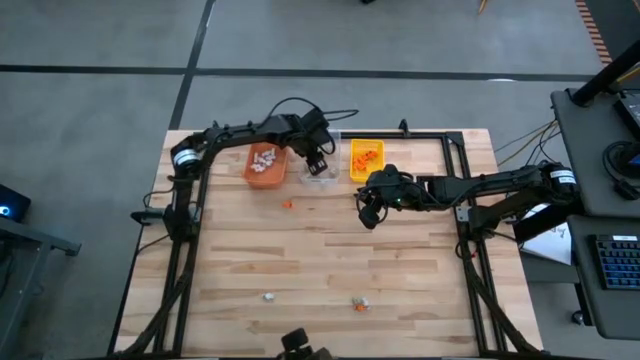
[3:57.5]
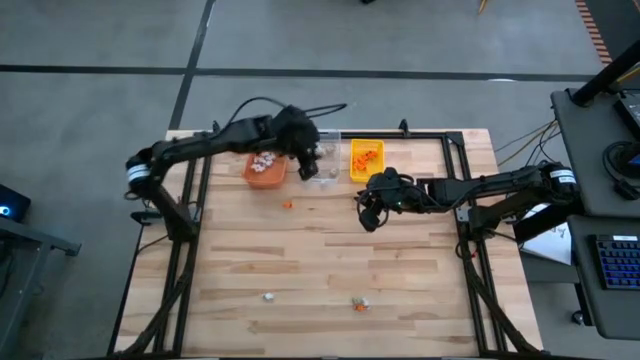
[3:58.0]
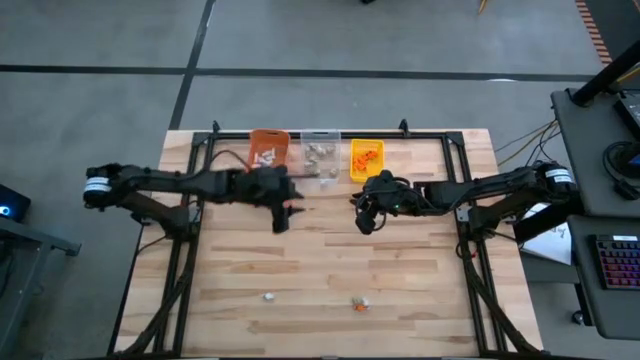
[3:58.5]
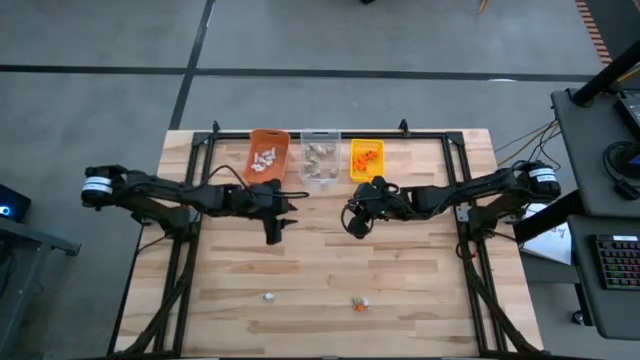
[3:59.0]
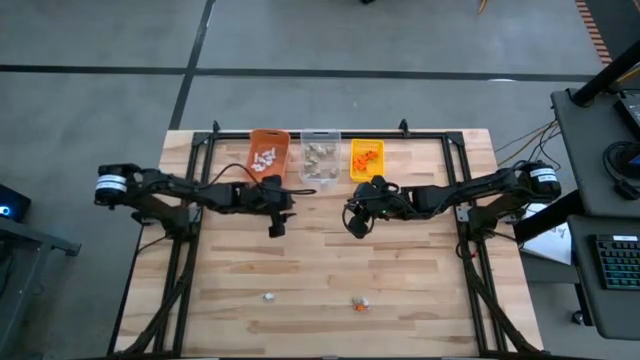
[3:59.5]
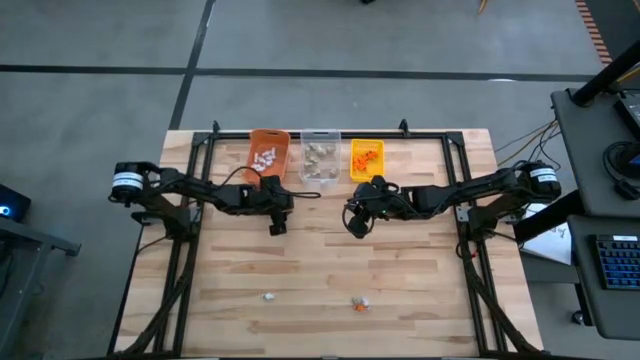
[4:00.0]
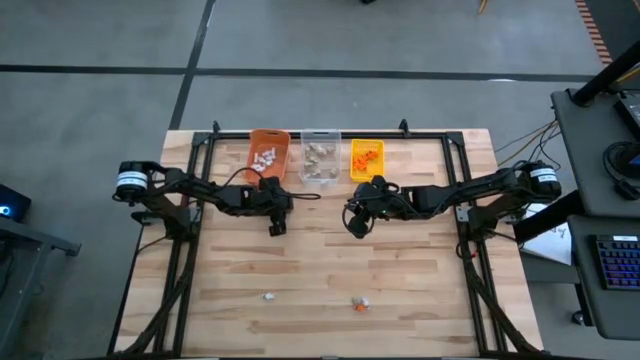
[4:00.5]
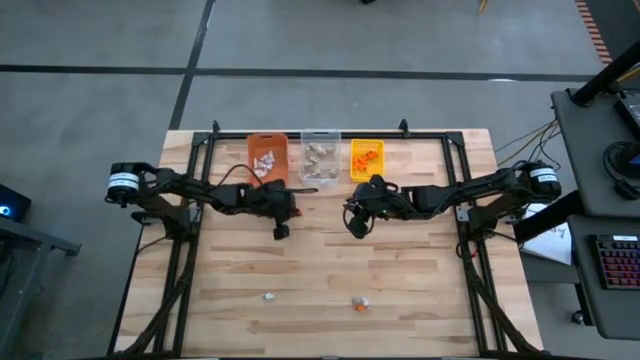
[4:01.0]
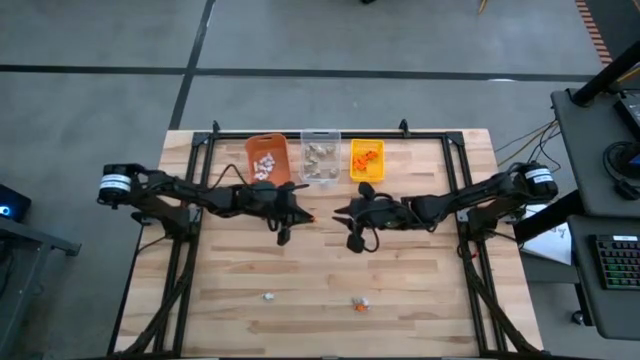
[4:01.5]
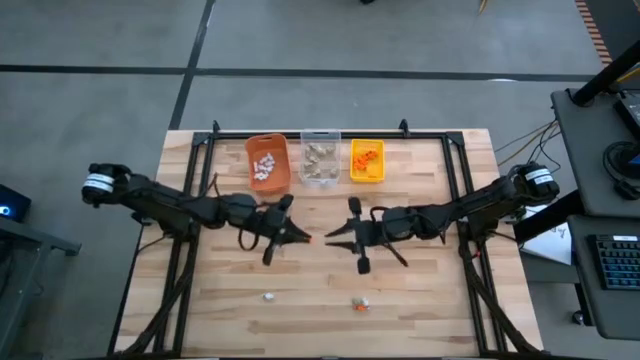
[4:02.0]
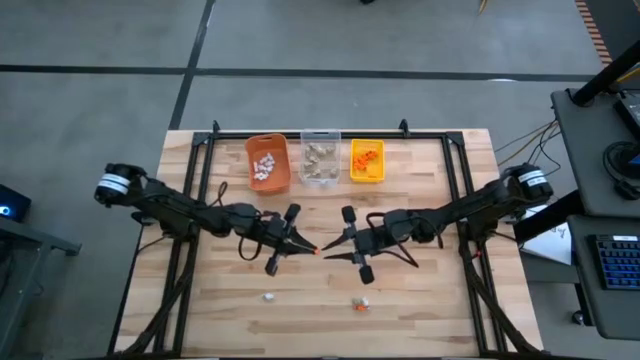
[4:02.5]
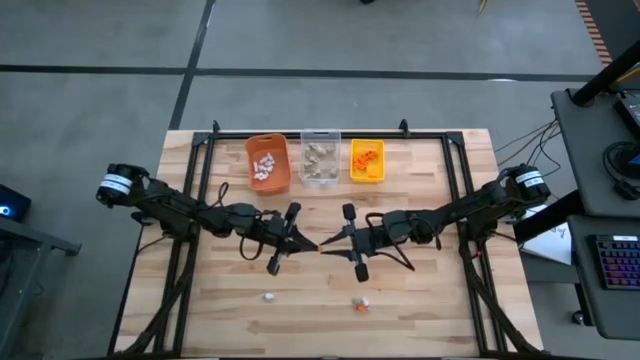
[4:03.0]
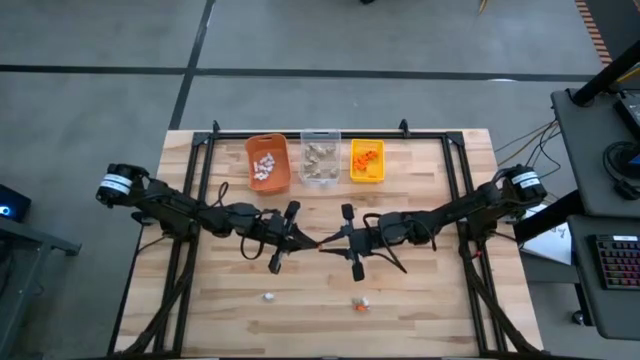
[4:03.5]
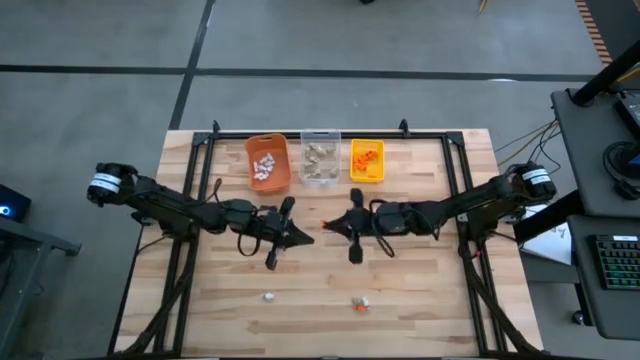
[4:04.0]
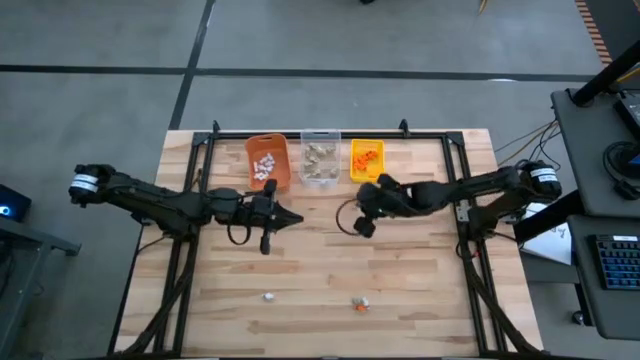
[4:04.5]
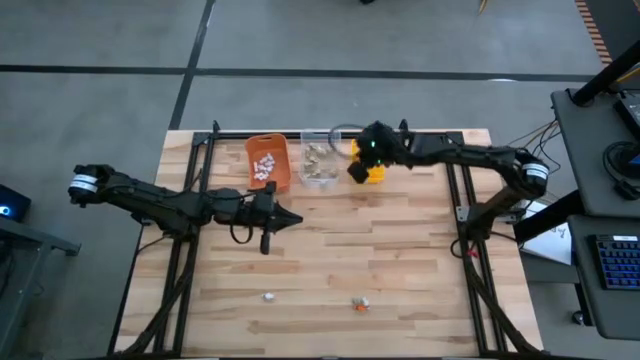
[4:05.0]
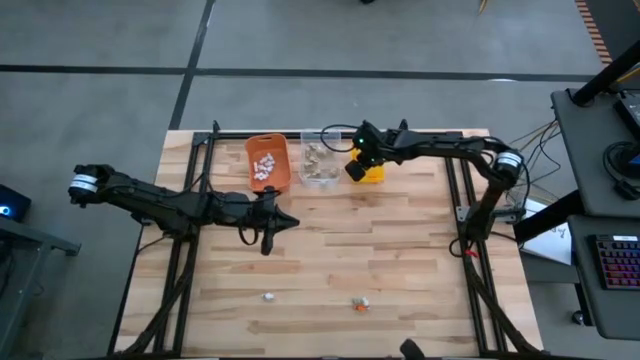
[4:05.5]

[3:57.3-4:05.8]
Task: Sort Halloween decoration
Put the orange skeleton toy into the yellow bin

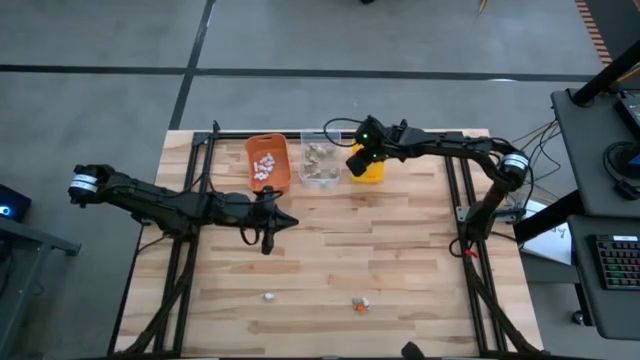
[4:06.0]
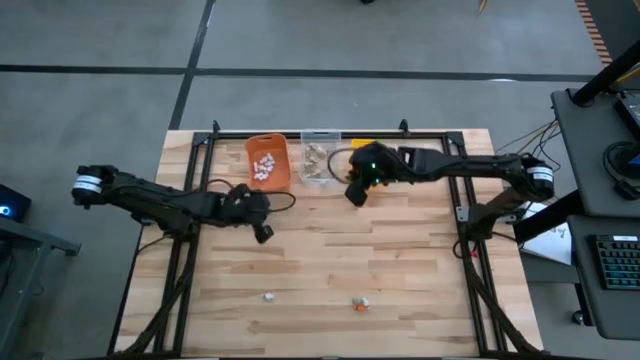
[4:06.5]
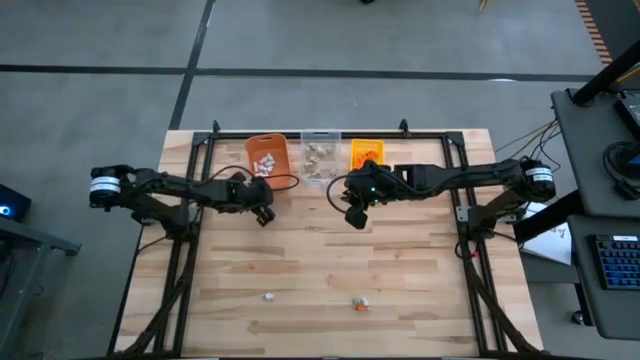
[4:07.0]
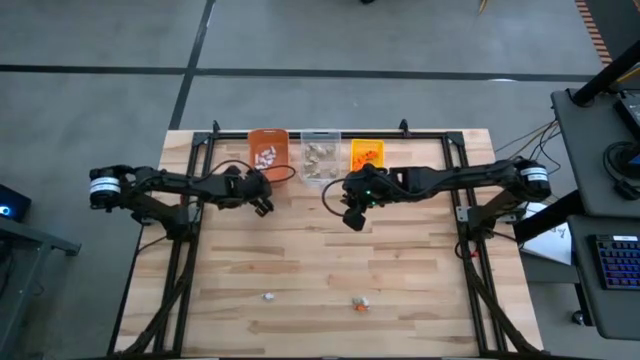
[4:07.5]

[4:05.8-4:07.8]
Adjust the orange bin

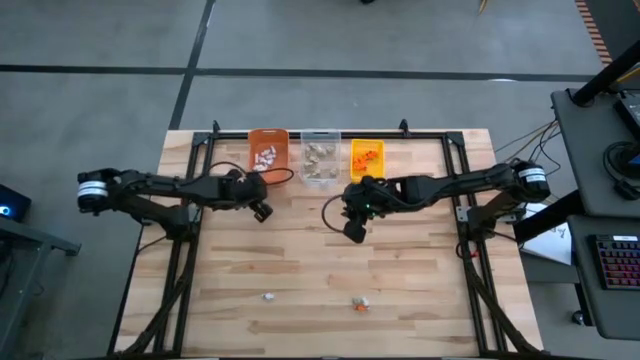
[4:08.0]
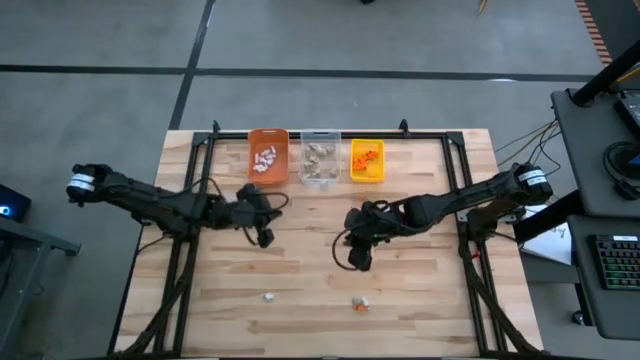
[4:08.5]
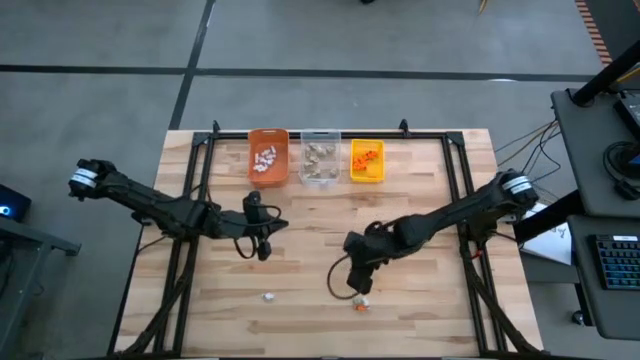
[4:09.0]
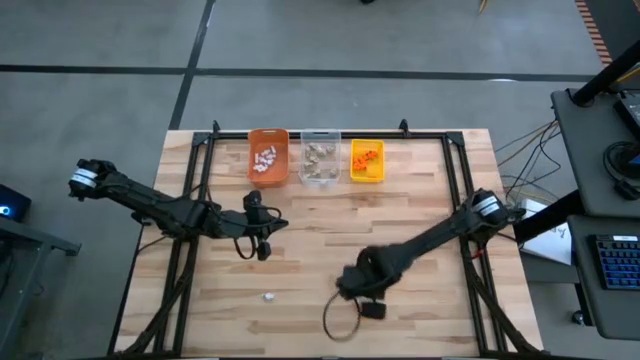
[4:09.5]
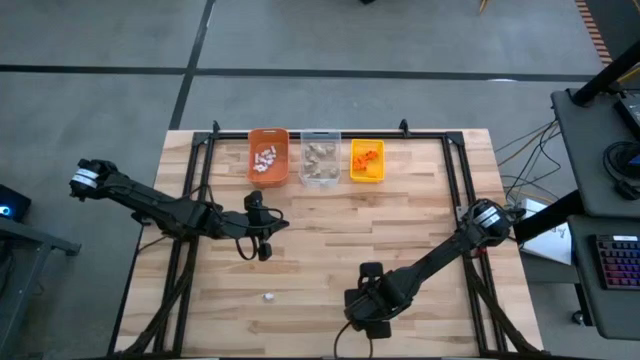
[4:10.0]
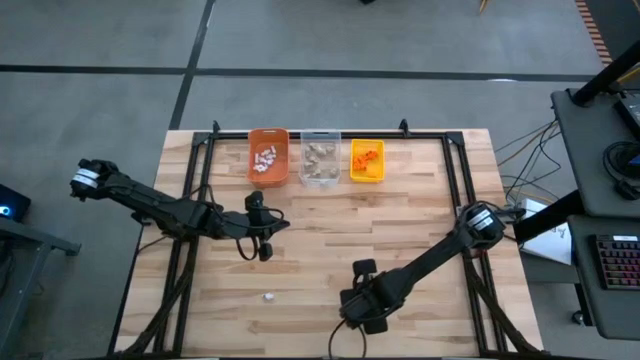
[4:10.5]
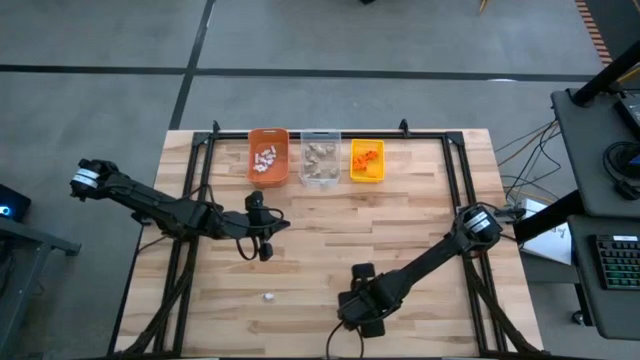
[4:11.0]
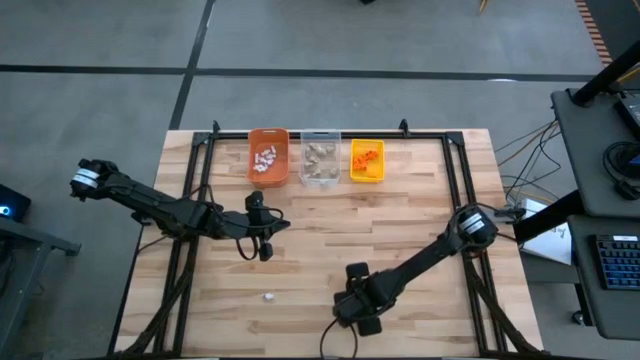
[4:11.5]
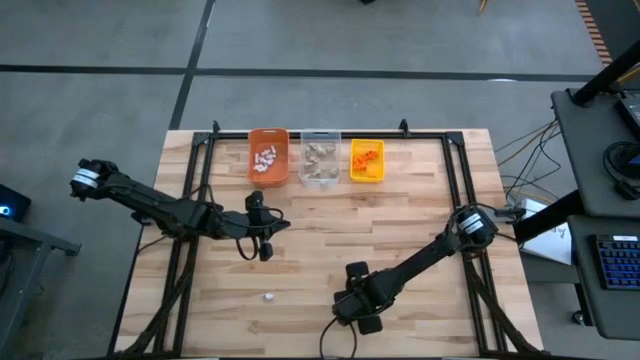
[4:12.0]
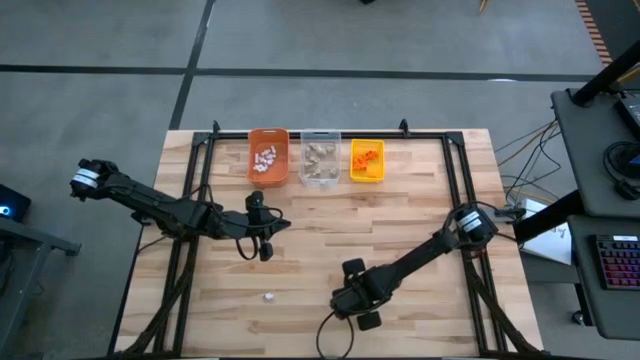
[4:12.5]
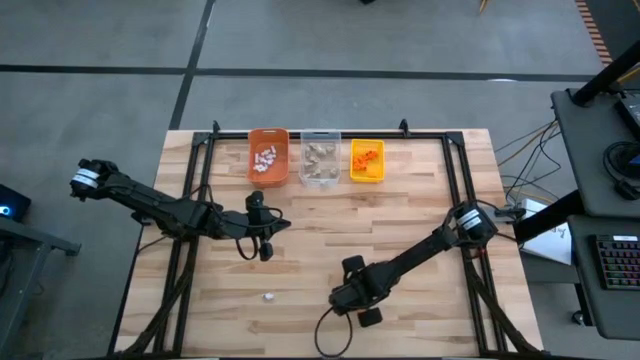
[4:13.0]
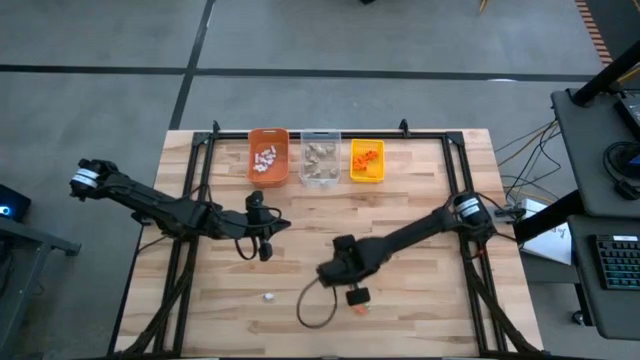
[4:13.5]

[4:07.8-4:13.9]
Put the gray skull toy into the transparent bin

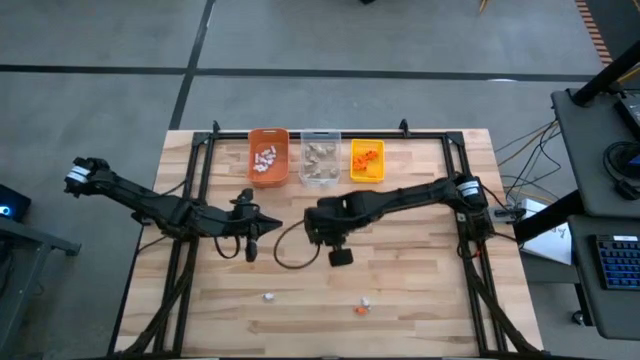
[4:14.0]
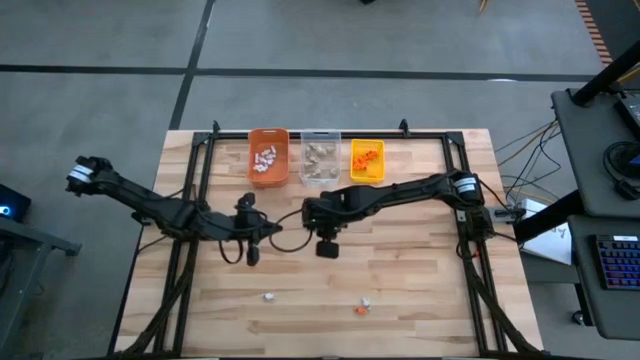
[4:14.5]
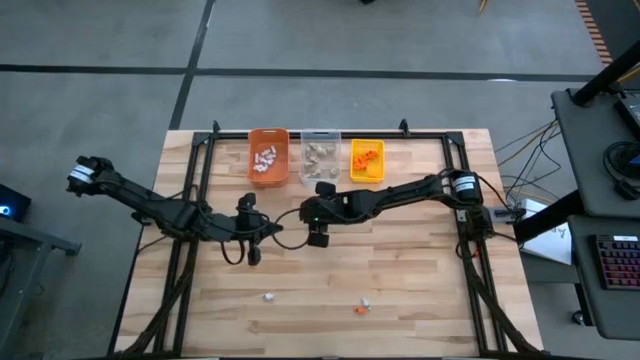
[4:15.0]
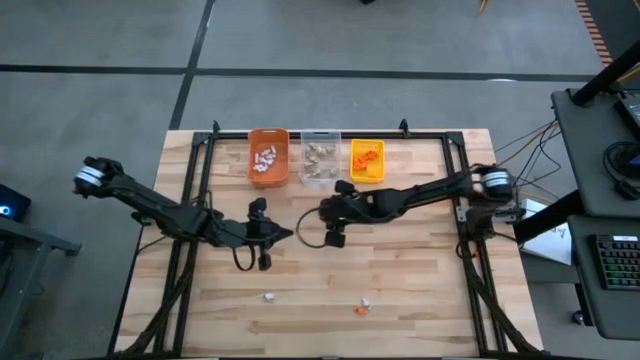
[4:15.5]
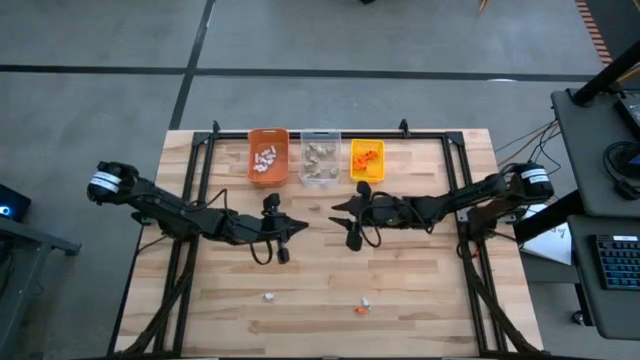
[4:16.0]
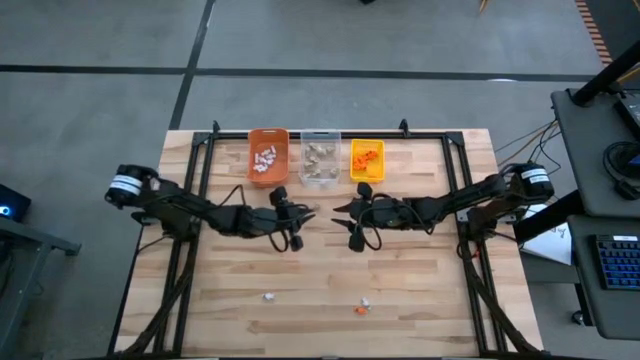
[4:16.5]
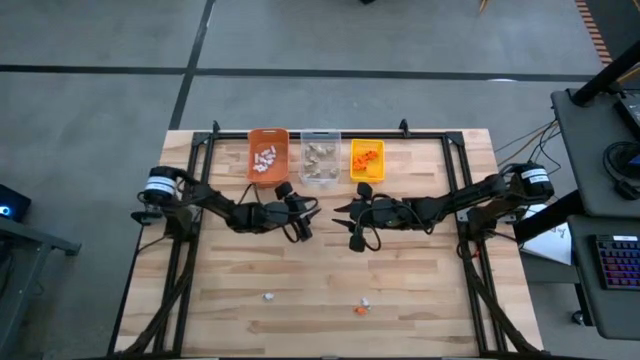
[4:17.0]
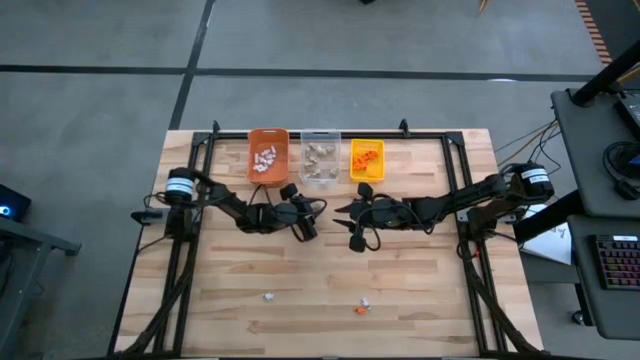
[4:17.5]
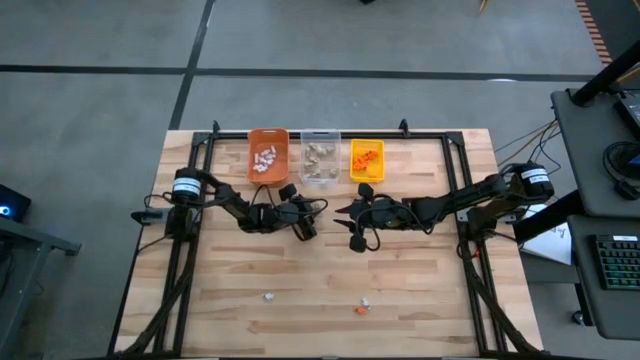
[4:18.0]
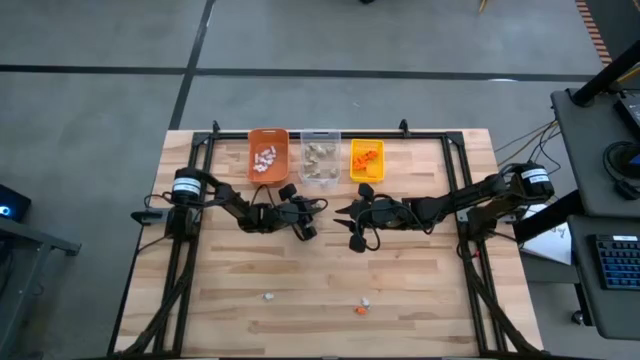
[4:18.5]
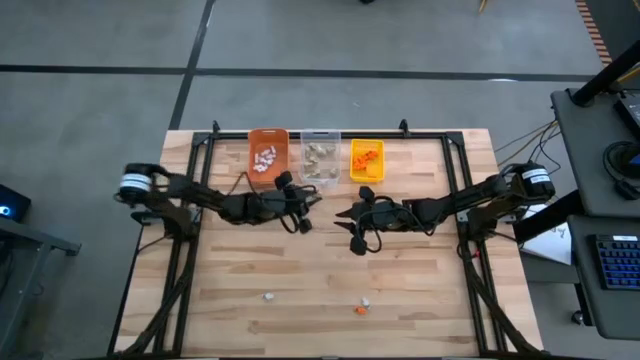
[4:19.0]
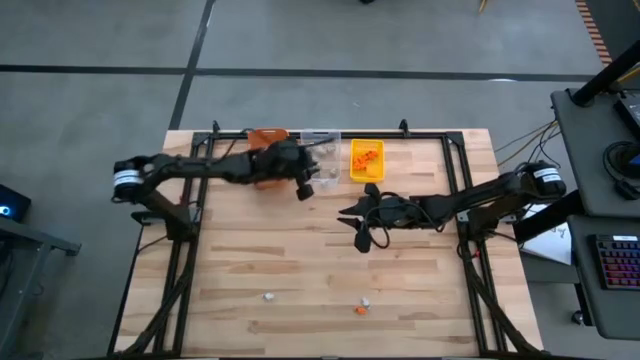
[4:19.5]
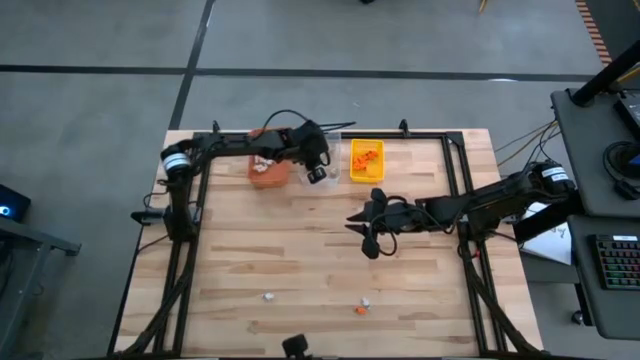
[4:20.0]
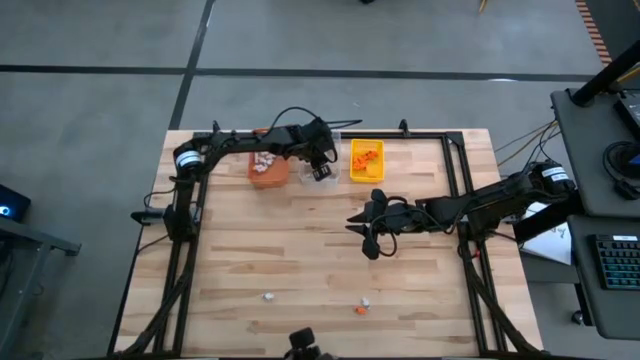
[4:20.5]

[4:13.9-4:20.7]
Put the gray skull toy into the transparent bin
